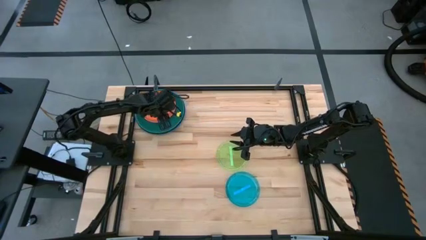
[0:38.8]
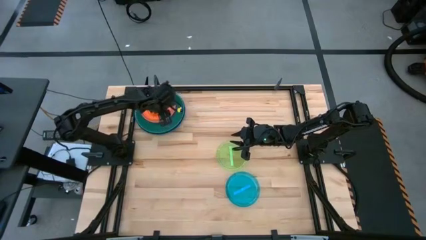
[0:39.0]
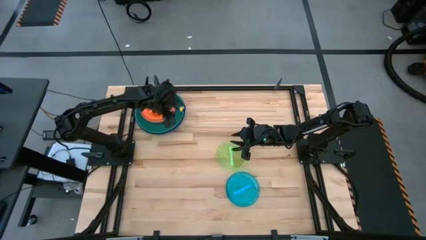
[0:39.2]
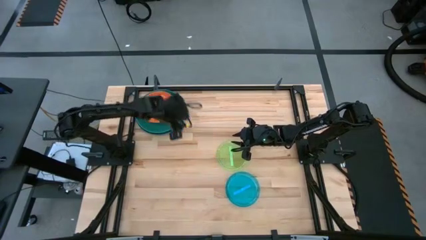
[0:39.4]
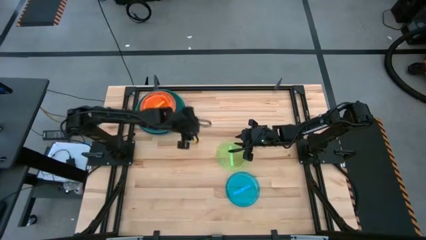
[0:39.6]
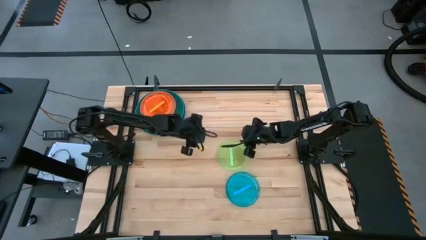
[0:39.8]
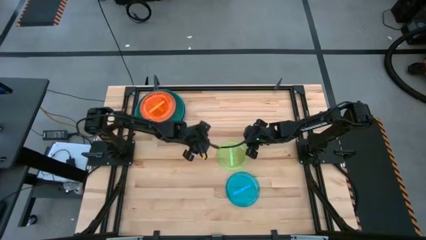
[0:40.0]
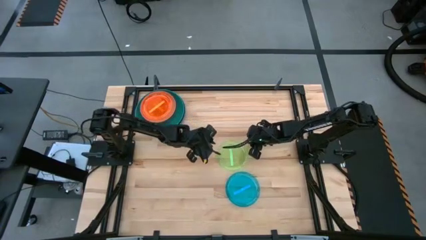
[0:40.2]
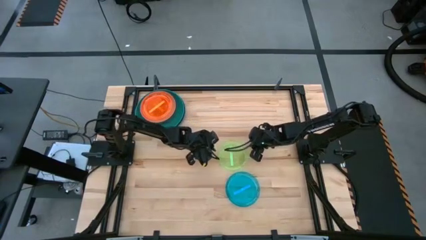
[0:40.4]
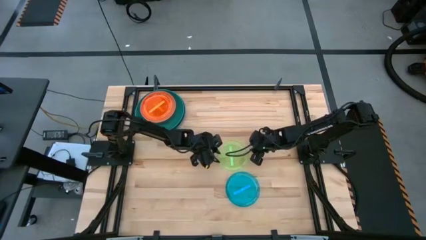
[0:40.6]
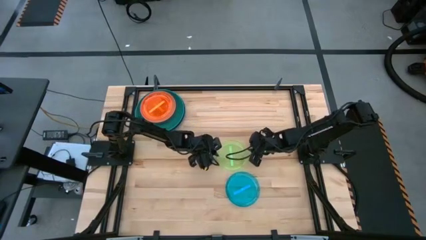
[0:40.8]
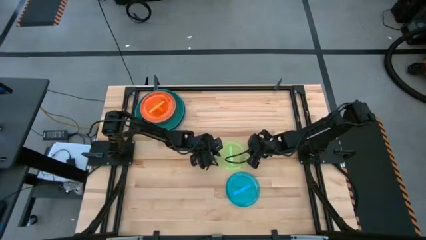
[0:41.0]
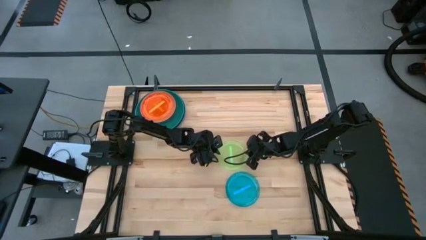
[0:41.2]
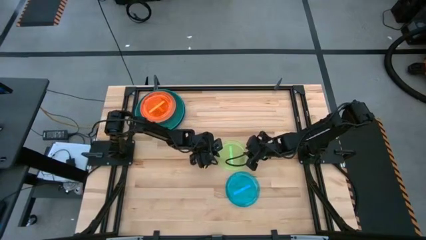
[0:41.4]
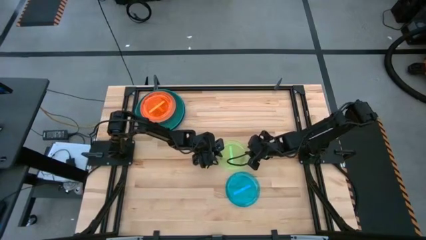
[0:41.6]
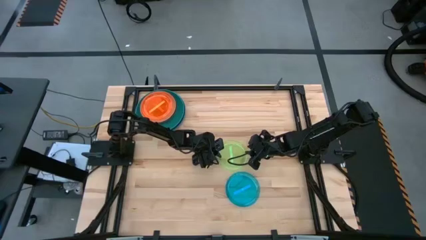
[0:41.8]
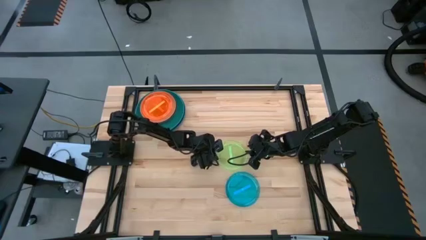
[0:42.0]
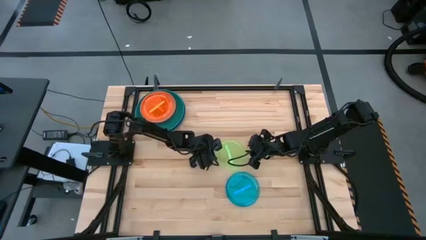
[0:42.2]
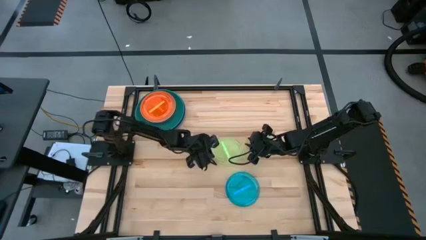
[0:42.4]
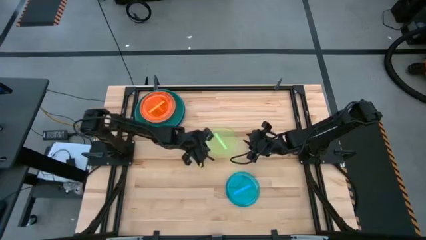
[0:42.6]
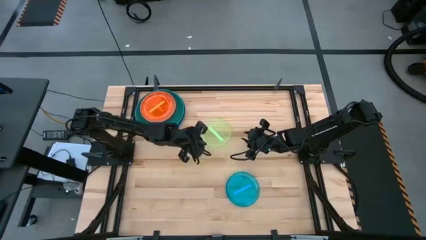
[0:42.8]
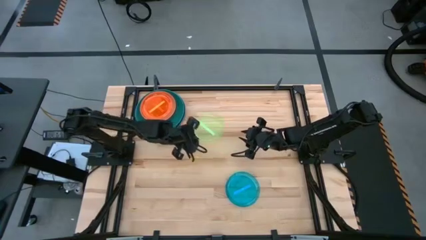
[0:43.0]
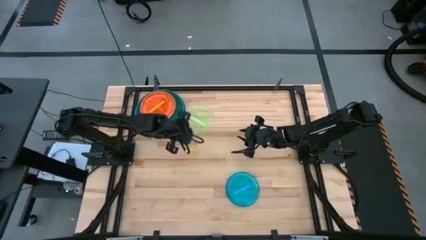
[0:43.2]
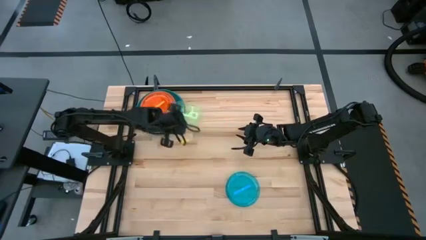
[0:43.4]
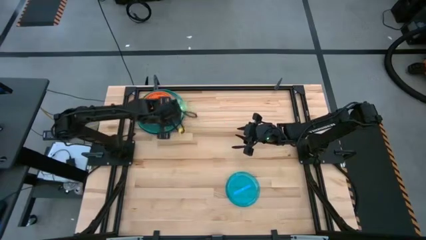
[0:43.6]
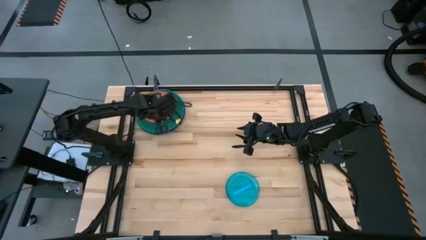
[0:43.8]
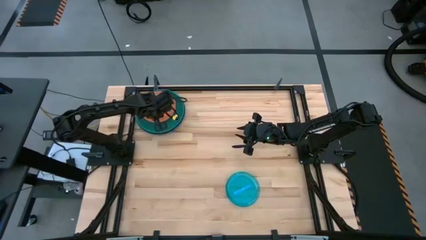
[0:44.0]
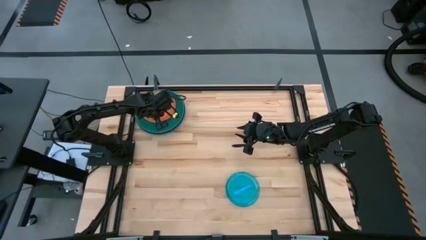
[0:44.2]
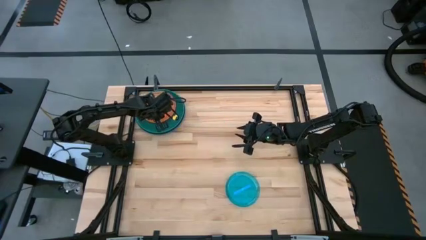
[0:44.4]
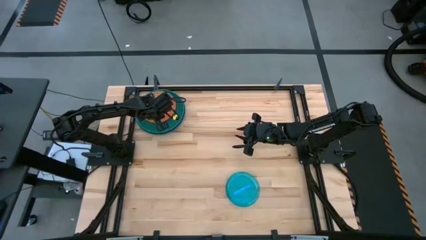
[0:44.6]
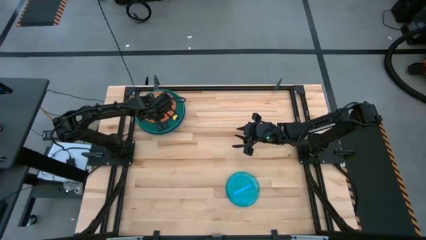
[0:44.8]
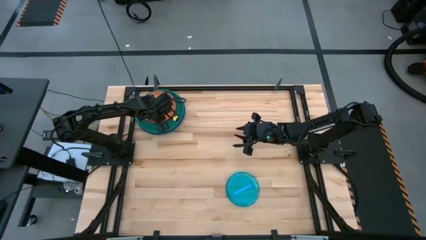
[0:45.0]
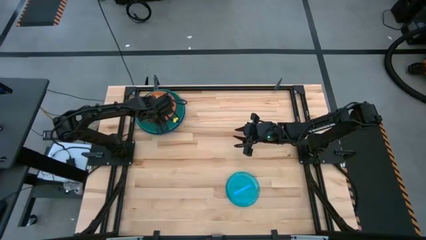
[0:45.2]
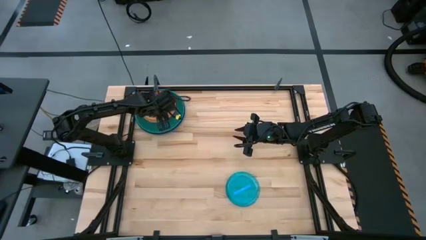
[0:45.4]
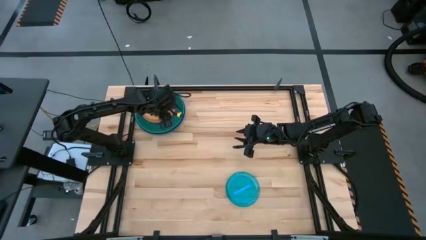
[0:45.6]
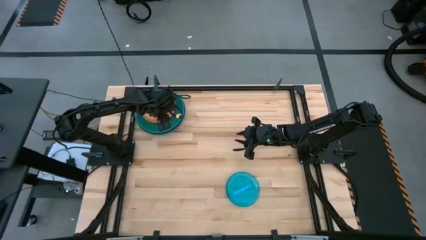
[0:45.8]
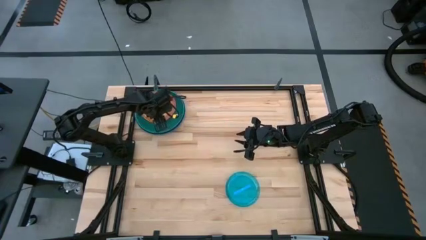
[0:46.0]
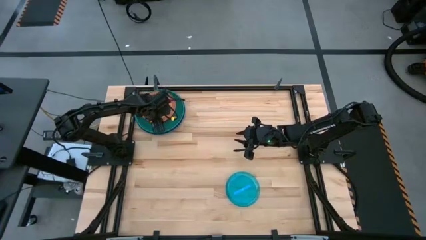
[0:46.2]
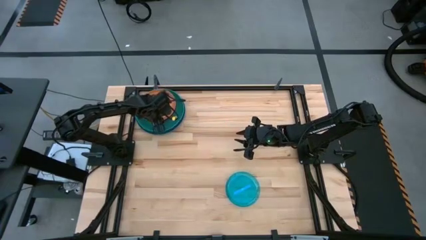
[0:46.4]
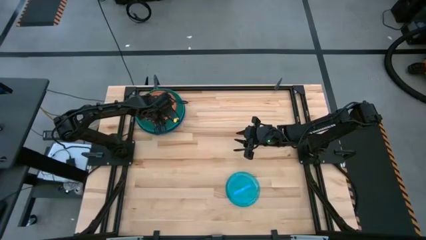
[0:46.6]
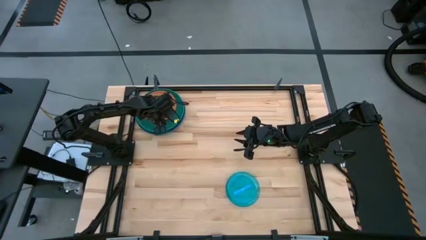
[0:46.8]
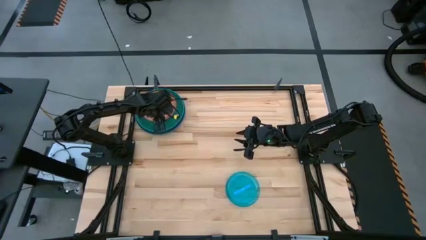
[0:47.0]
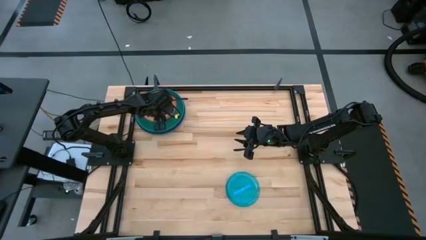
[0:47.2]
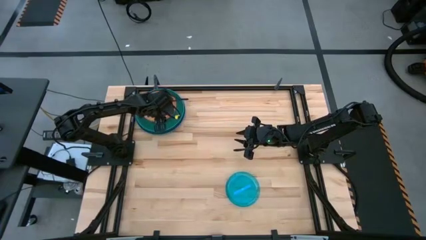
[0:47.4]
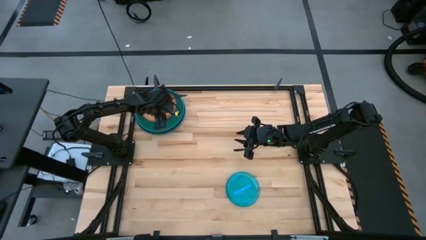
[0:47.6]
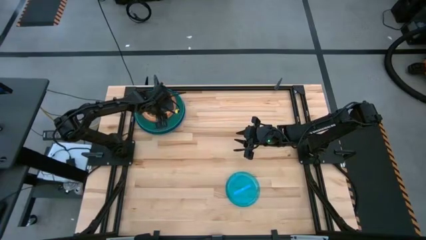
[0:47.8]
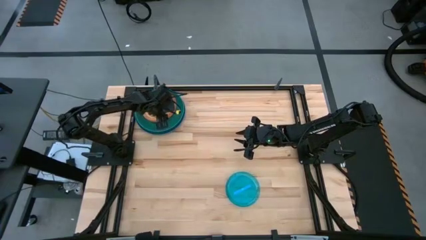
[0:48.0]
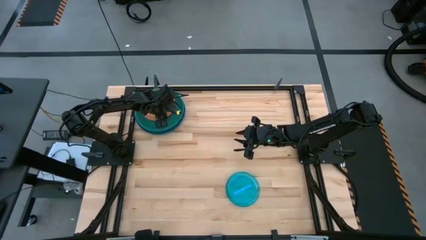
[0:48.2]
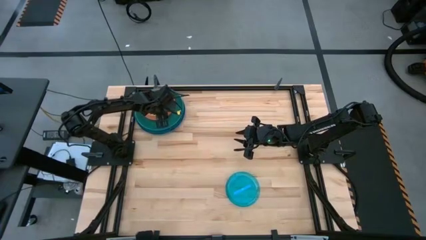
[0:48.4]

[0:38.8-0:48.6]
Task: Stack plastic plates
Stack the small green plate on the small orange plate

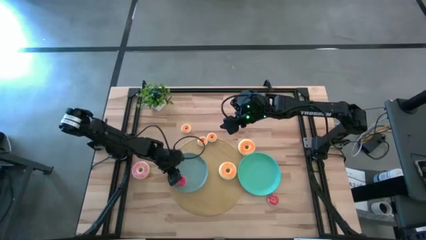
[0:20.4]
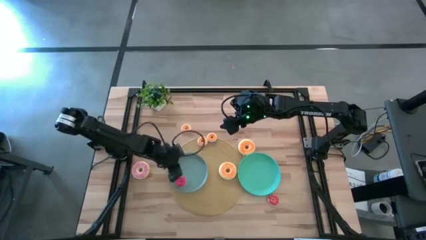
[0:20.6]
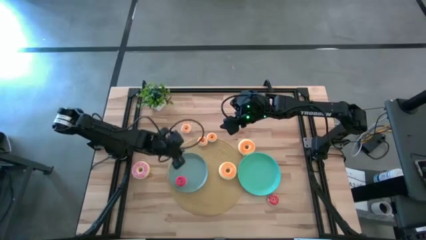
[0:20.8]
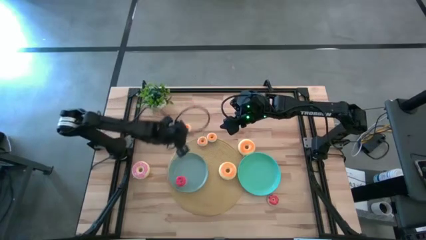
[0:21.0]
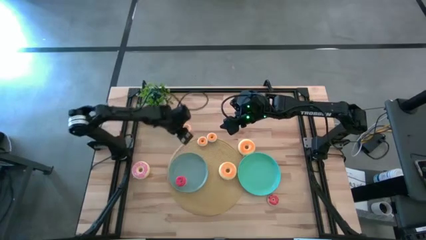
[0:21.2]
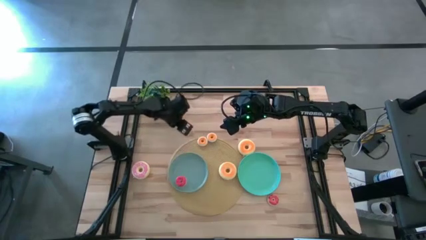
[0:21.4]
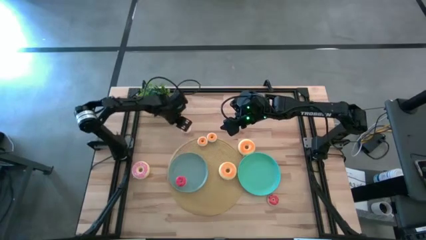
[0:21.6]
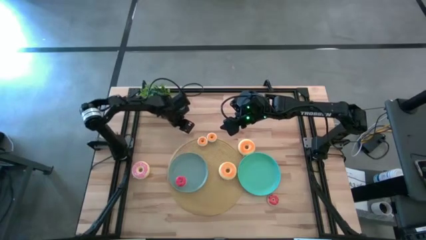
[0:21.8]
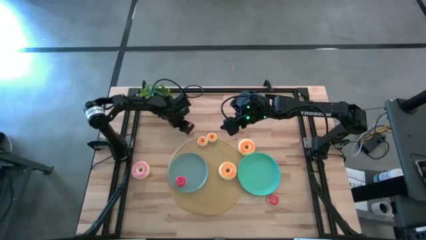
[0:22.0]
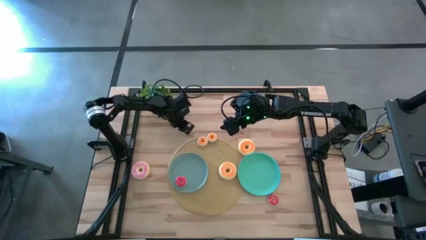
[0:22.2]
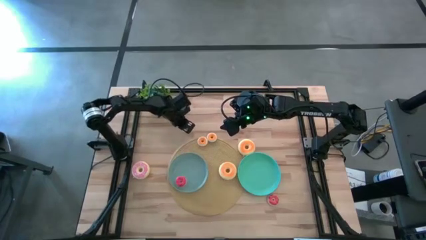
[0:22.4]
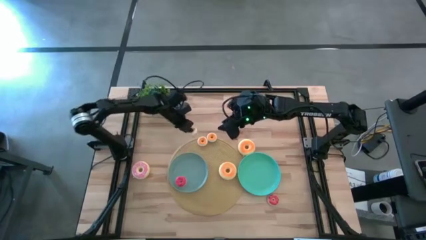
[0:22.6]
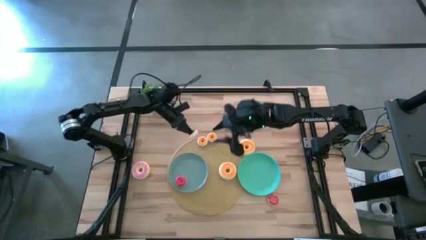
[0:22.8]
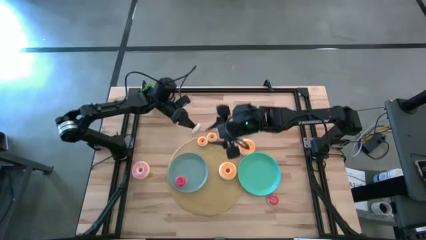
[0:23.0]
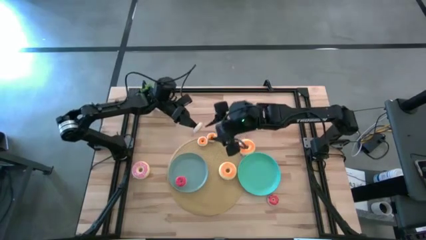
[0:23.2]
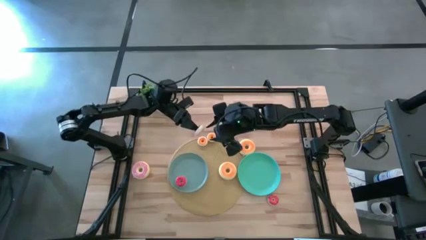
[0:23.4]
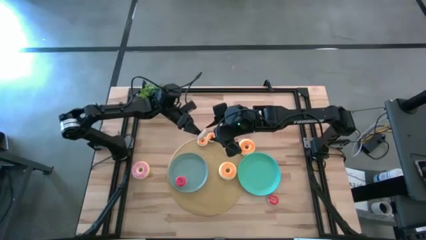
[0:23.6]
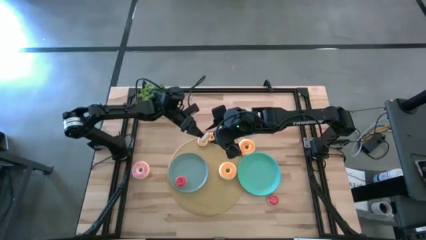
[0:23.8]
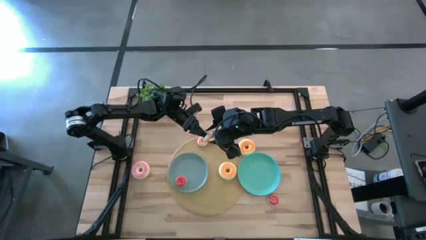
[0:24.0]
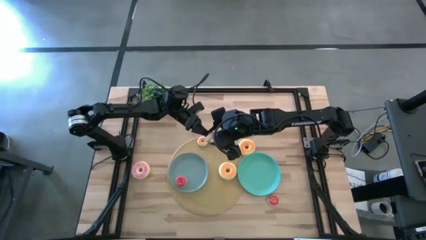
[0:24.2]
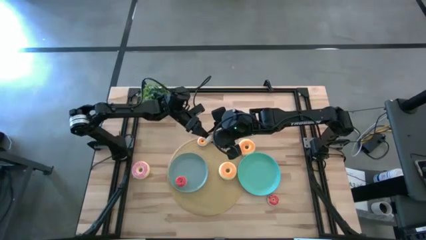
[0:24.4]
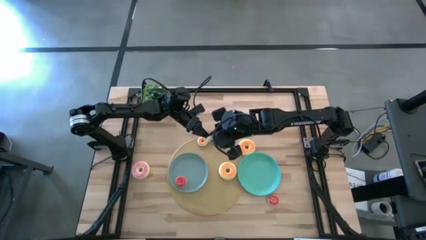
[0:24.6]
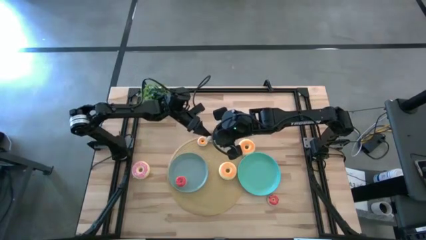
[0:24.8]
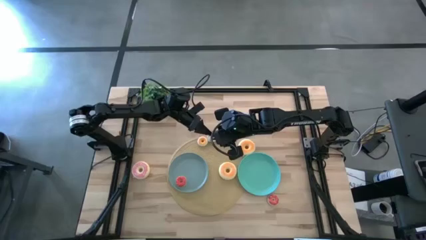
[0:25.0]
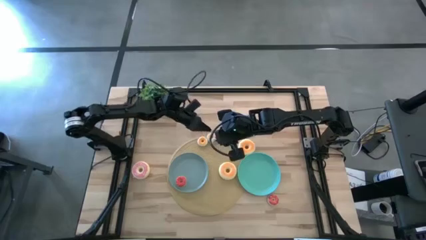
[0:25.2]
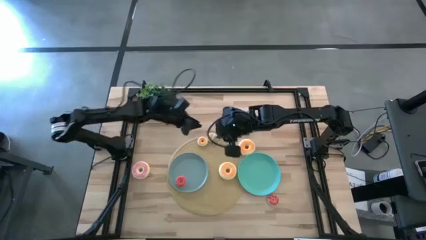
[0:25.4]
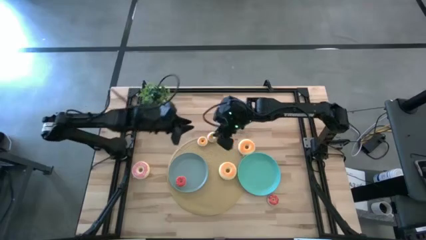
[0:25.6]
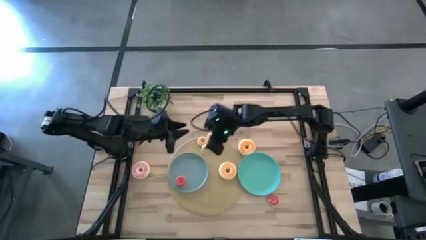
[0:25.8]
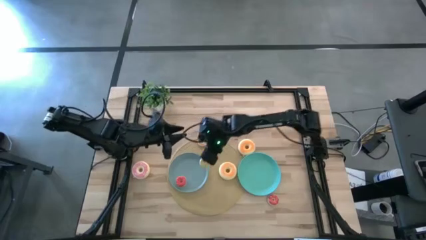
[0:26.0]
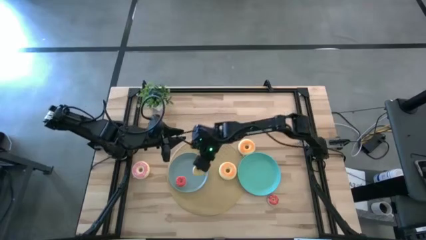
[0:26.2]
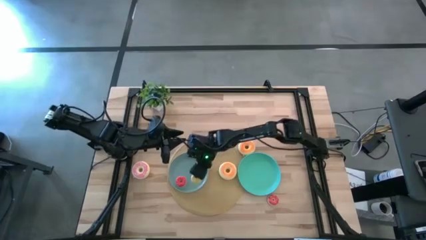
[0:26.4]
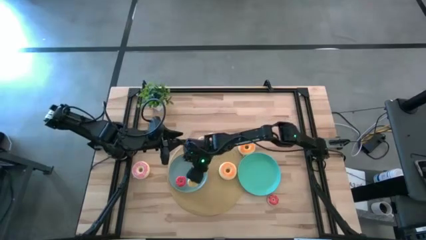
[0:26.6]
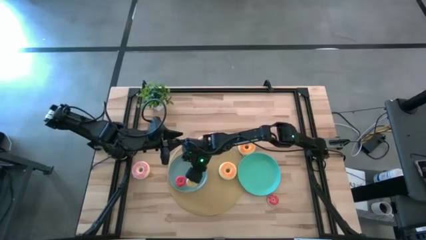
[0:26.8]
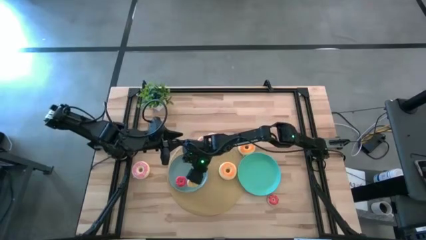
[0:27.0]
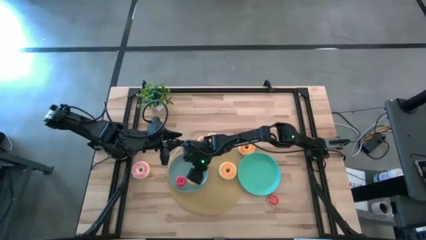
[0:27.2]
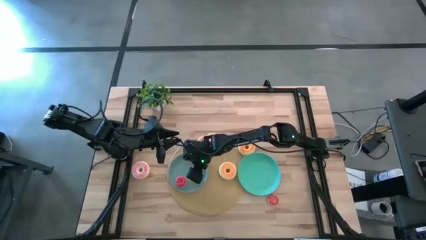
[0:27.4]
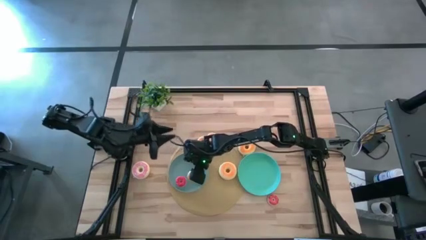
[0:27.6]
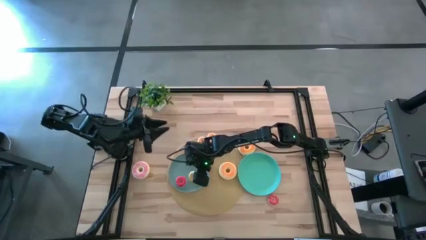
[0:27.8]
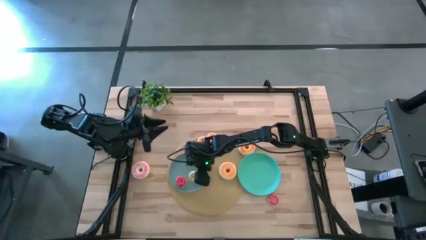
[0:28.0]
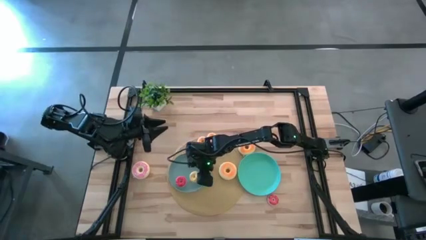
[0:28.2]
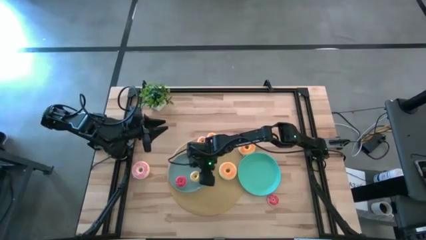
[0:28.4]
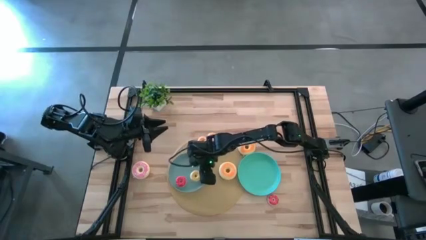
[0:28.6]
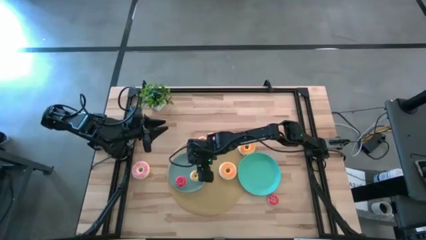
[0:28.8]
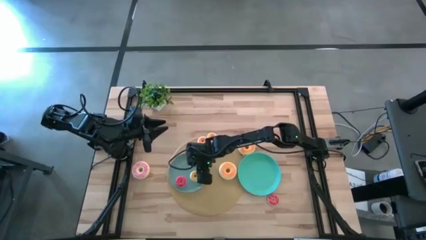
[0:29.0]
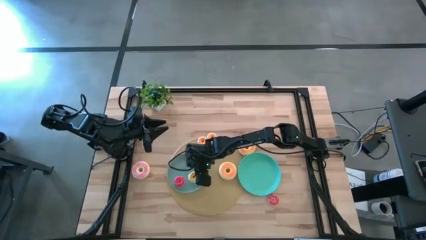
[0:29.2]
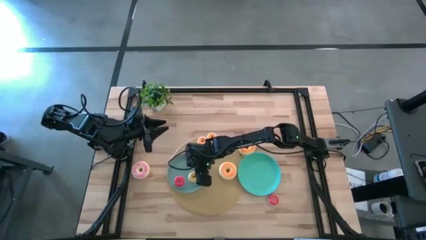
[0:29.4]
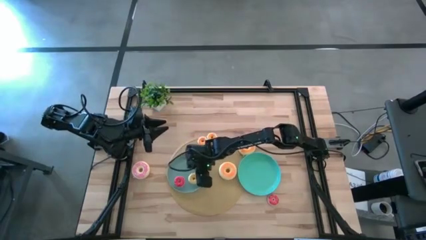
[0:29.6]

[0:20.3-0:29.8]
Task: Pick & Place donuts
Put the small yellow donut on the blue plate
